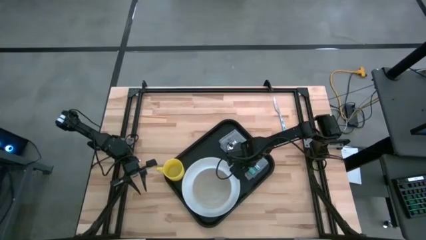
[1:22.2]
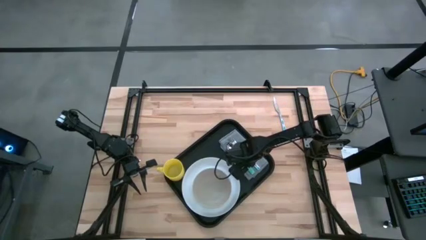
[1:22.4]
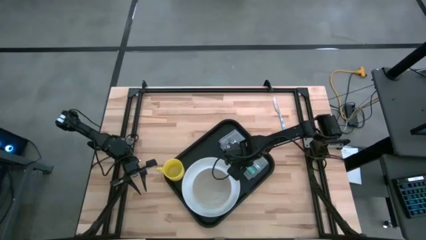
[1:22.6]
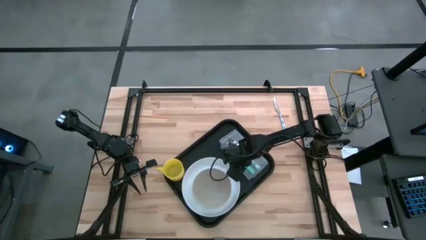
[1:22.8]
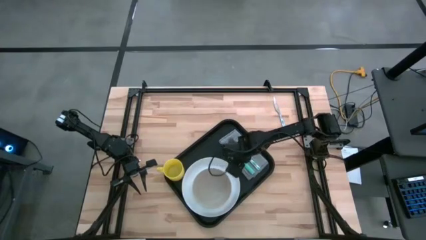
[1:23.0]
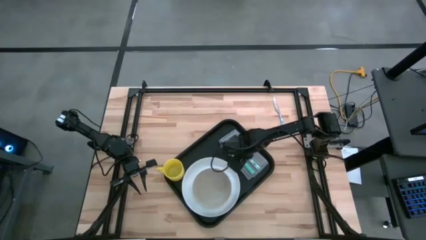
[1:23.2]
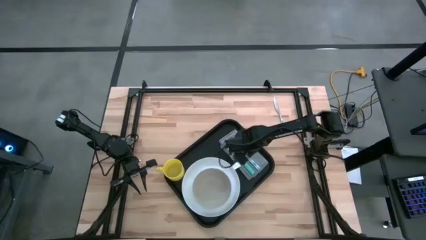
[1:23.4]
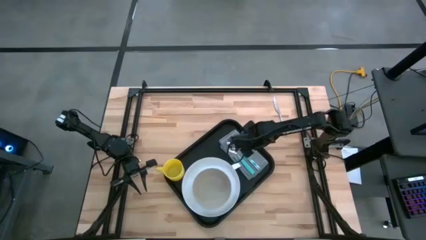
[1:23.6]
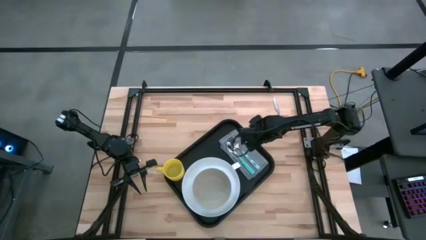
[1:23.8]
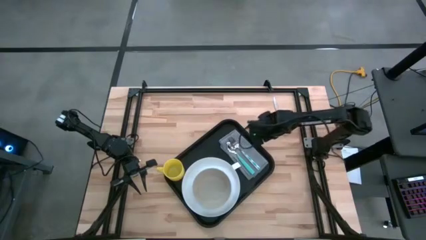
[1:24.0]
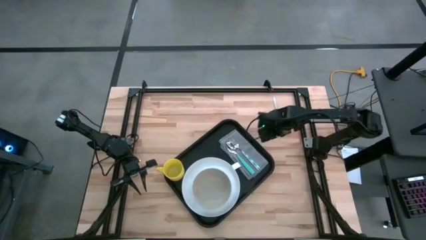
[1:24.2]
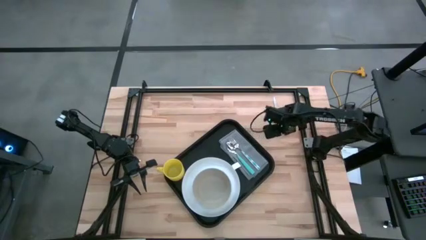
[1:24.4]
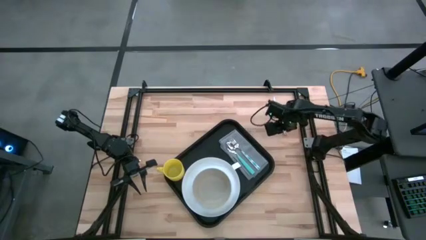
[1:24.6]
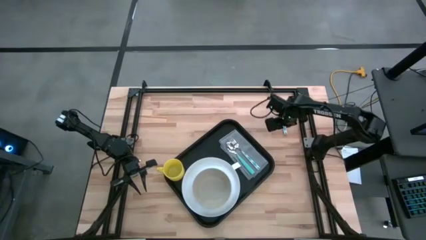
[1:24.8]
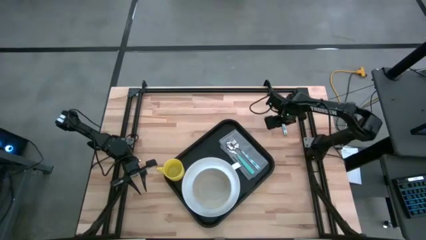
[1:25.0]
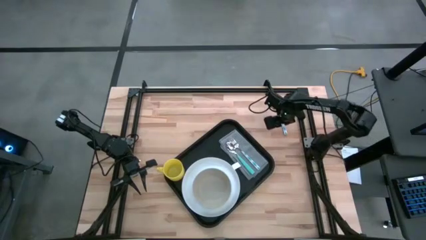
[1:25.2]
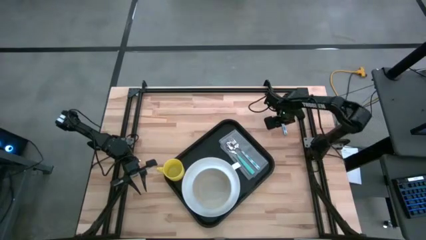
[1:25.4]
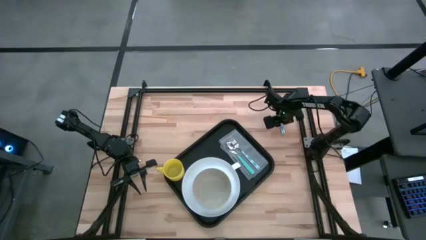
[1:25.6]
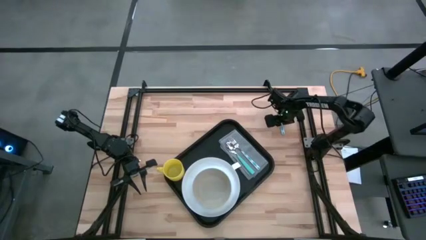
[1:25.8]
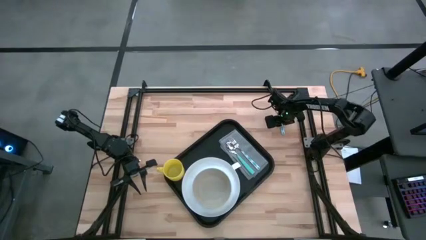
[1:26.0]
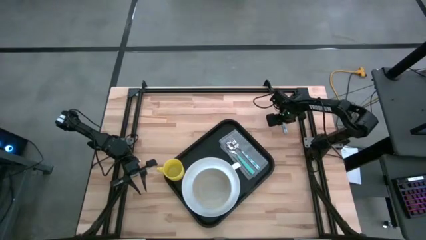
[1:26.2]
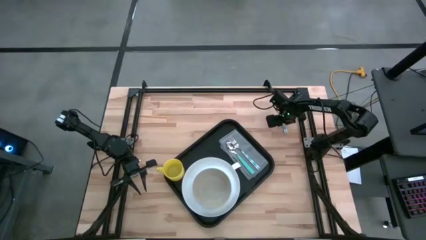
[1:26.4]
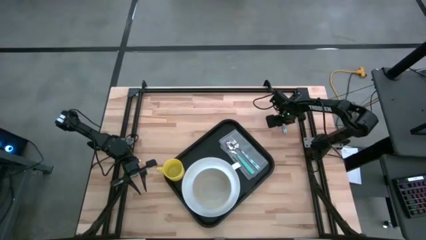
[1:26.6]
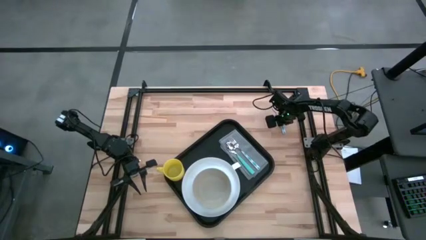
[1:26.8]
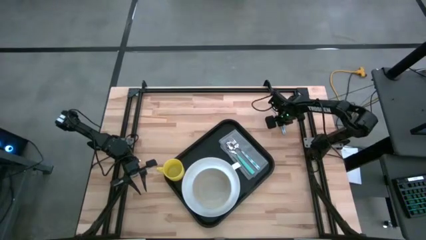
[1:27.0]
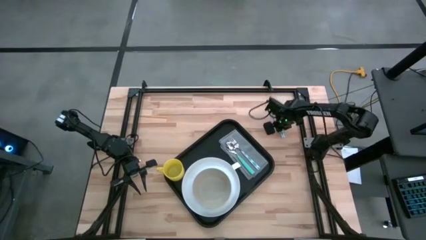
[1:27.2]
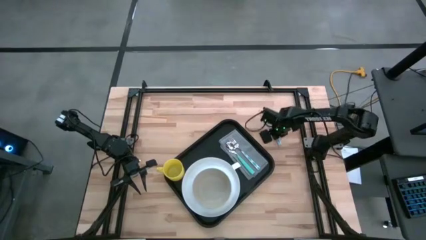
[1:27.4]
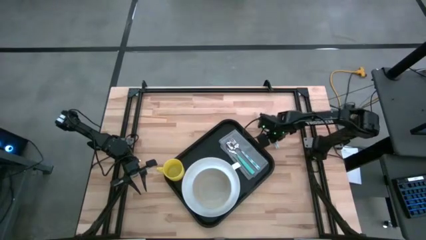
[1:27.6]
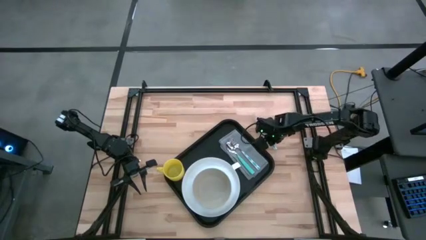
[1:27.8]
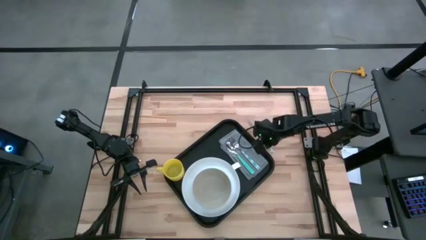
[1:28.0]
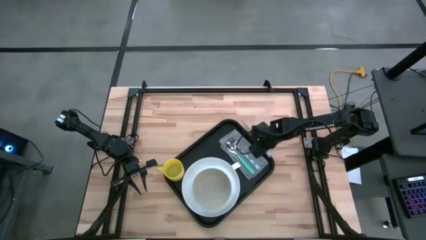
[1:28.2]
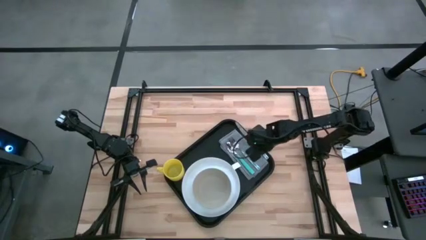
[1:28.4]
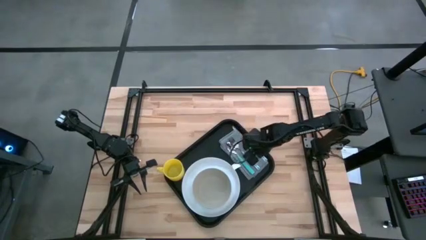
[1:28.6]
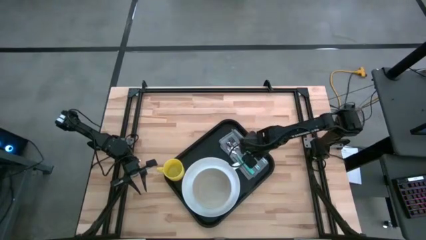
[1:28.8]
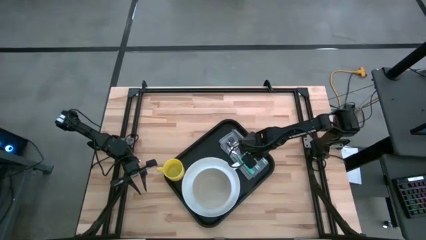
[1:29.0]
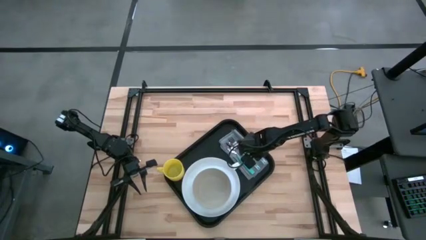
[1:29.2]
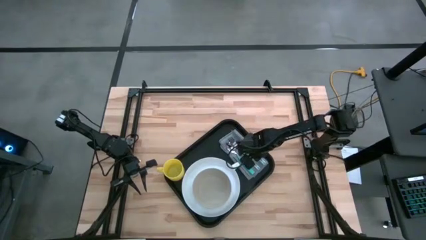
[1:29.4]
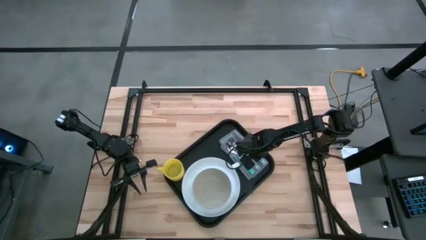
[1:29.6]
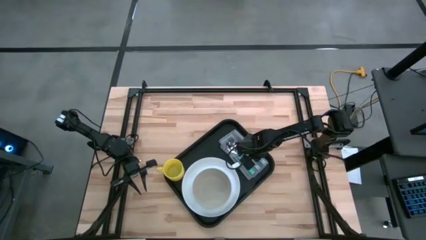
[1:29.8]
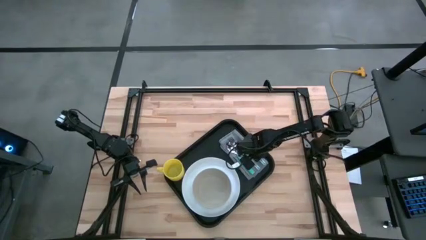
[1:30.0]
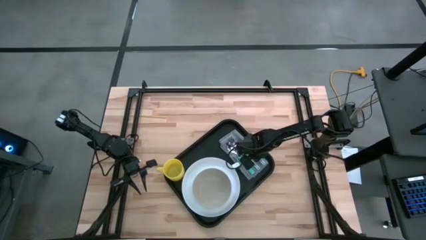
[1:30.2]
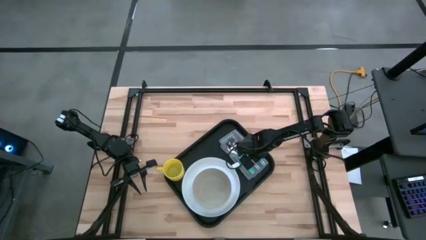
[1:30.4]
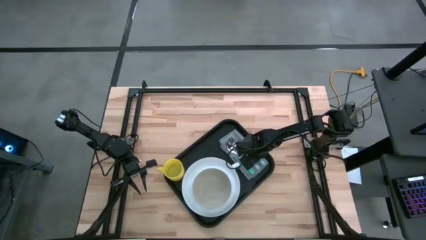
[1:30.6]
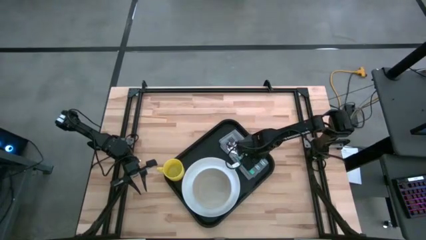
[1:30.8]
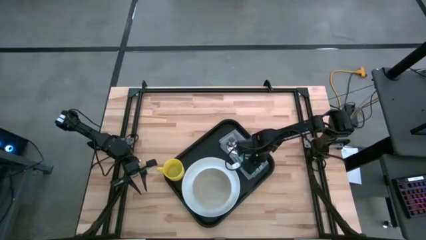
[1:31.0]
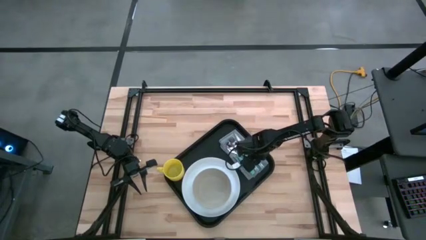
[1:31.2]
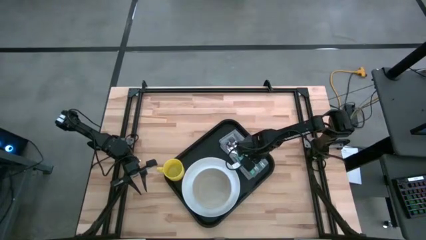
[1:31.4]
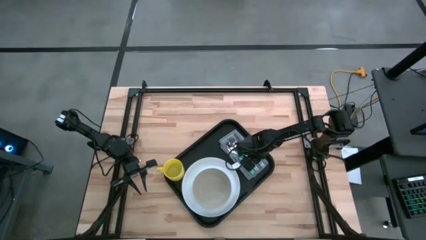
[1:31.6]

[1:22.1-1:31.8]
Task: Set up tray
Put the blue knife on the gray napkin to the right of the blue fork

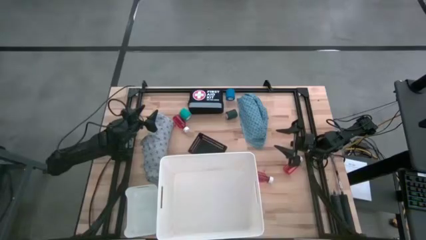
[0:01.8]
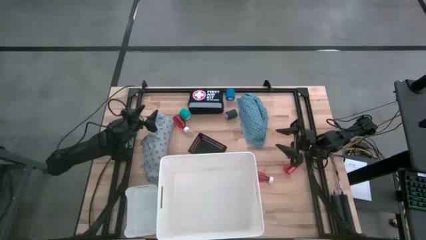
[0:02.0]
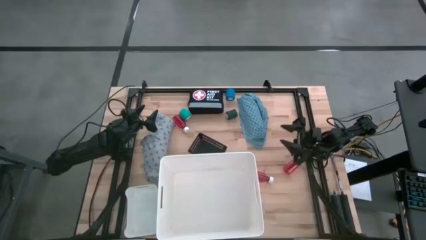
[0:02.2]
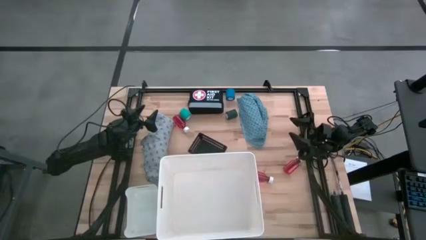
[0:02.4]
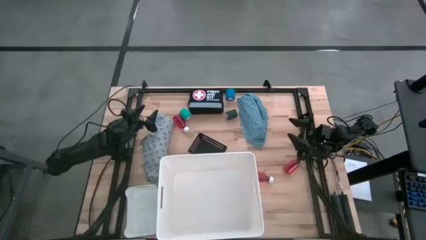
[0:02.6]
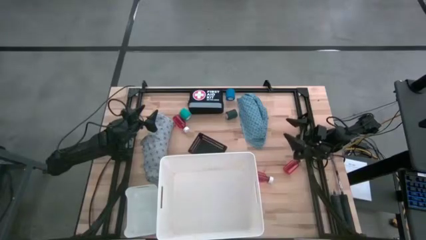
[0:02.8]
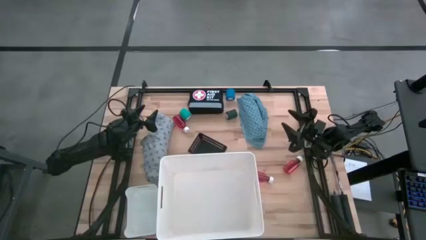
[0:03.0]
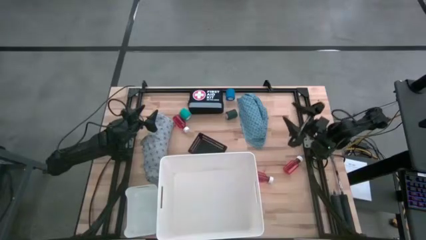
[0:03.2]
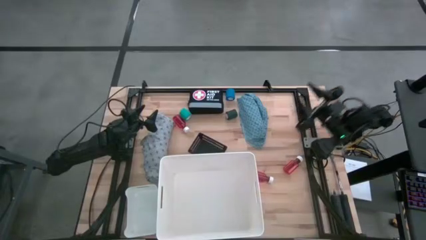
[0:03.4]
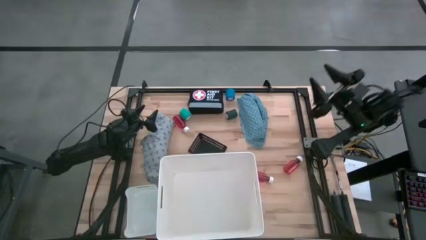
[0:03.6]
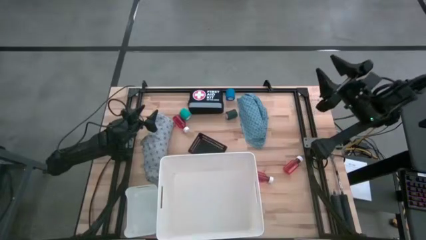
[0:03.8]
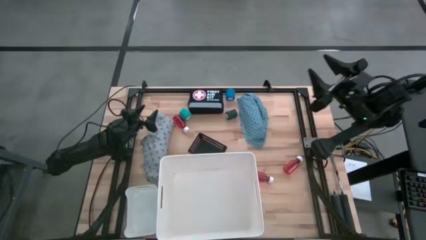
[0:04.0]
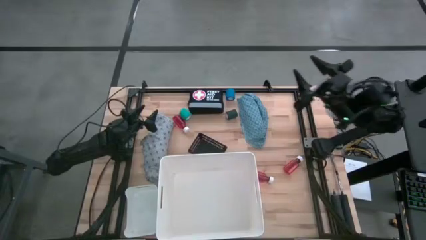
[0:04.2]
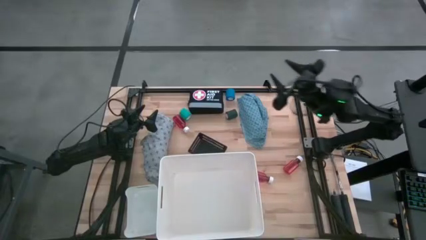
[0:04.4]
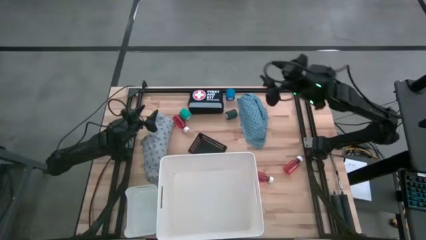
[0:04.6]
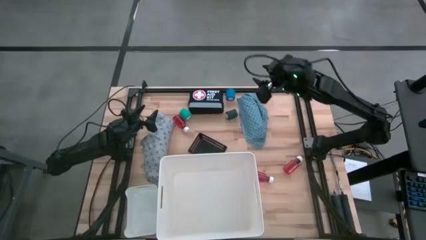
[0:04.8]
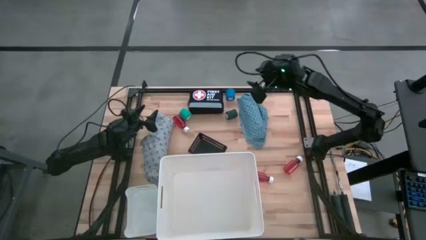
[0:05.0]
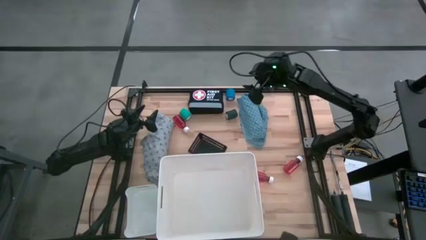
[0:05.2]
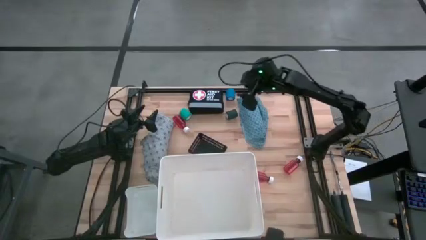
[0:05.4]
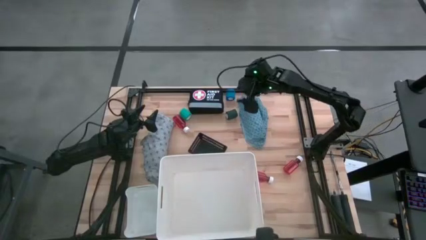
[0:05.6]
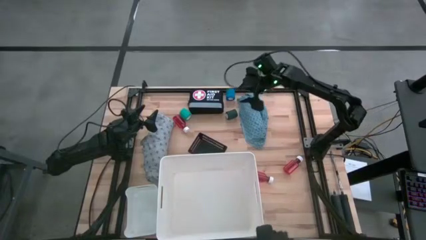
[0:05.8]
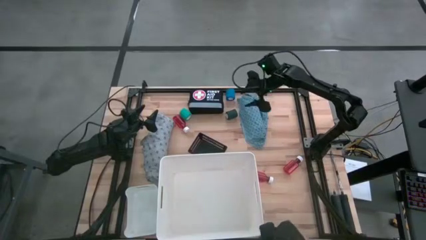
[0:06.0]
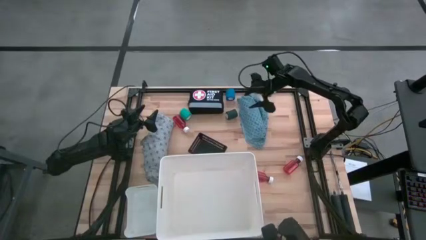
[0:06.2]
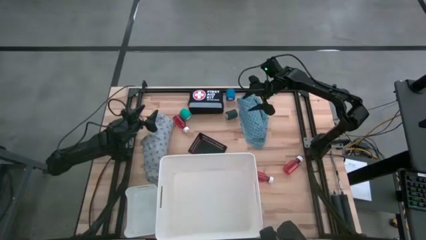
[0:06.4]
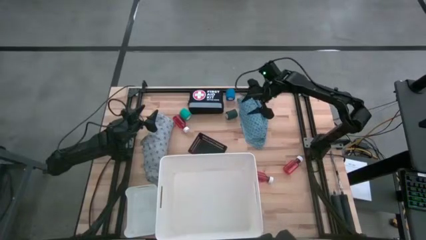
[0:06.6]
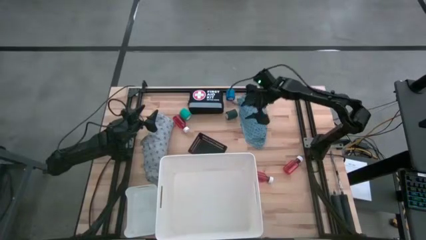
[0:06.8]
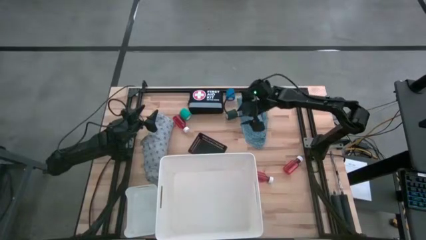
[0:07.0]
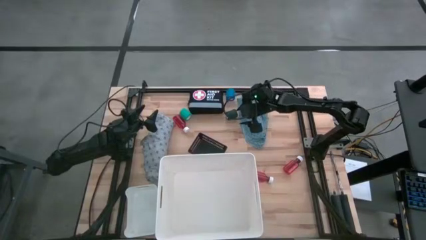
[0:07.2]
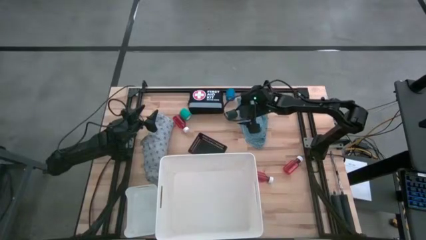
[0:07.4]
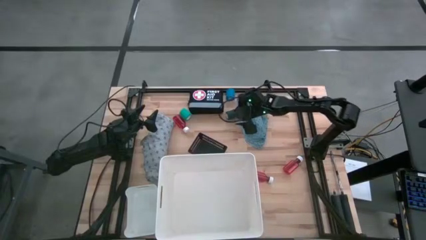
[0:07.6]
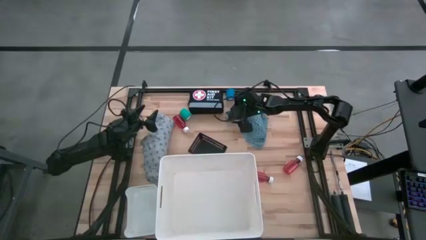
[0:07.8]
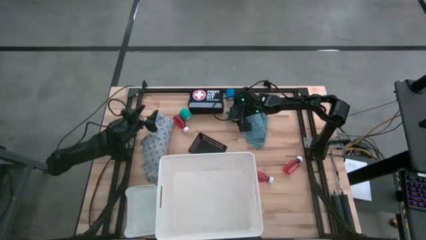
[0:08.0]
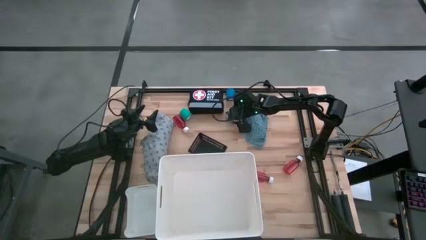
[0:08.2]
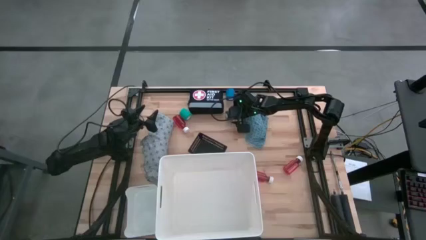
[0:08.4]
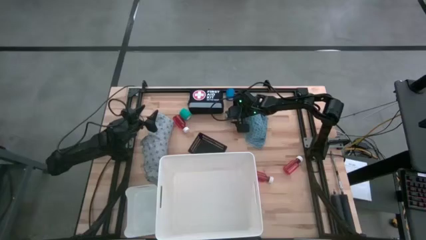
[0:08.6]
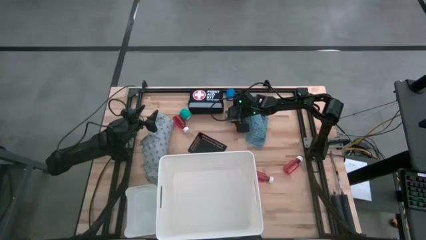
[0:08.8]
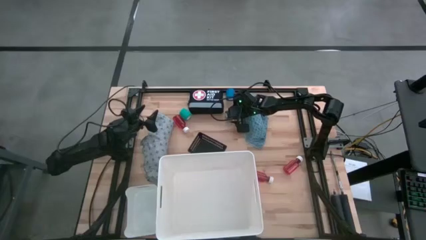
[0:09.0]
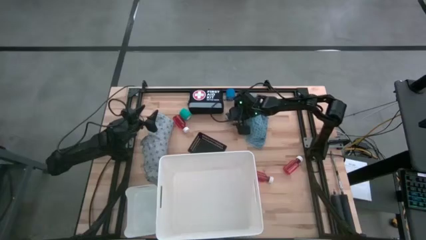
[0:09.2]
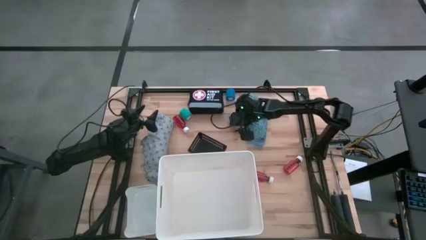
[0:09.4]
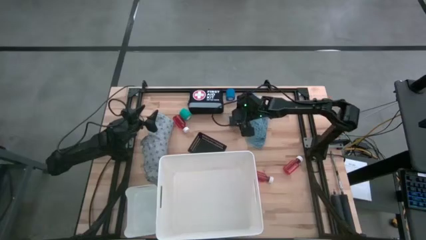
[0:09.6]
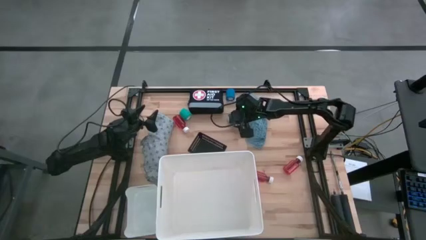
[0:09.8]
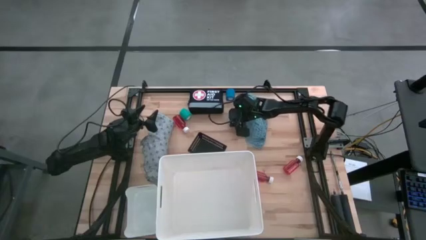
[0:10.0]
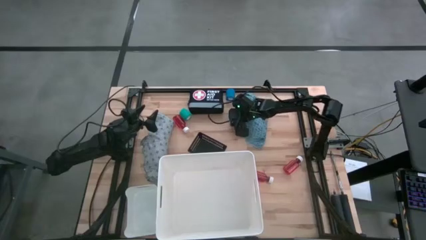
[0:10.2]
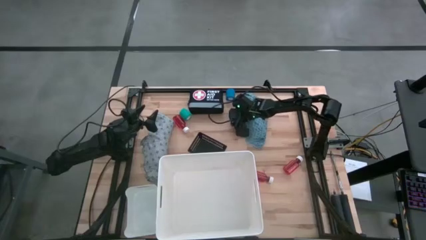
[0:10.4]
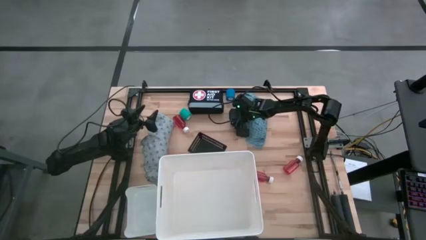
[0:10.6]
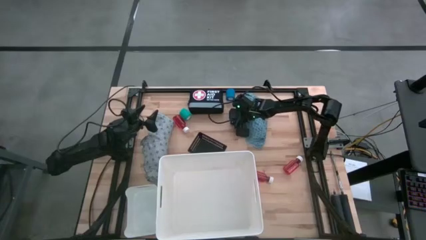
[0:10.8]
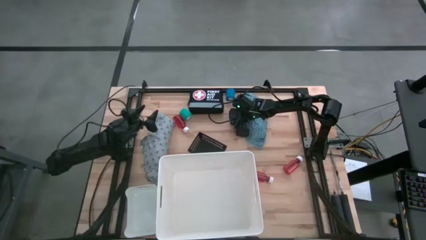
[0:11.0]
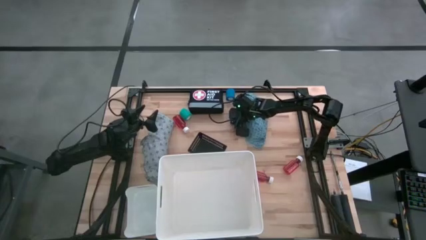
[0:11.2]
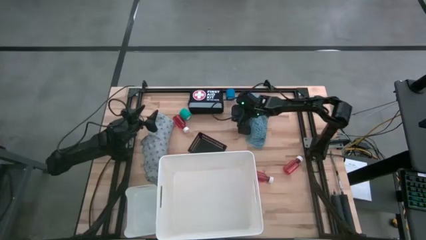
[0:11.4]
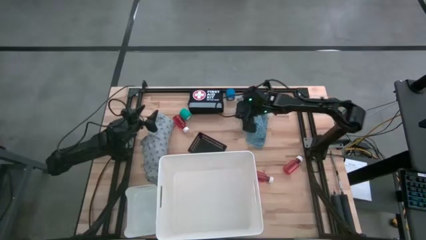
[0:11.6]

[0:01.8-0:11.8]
Task: Pick & Place Medicine items
Put the black bandage into the black bin
